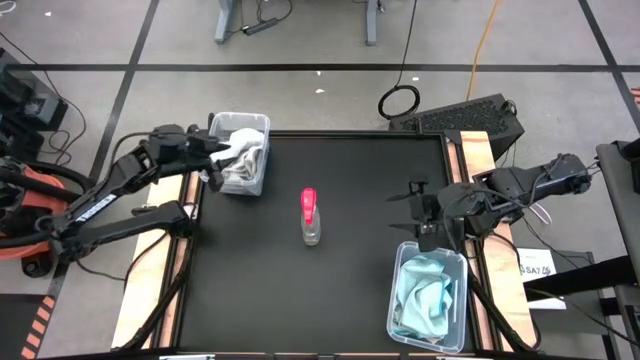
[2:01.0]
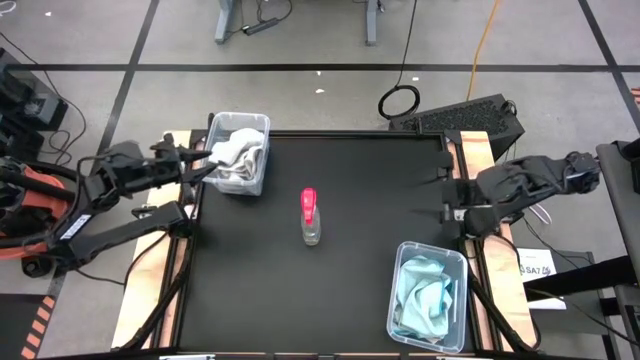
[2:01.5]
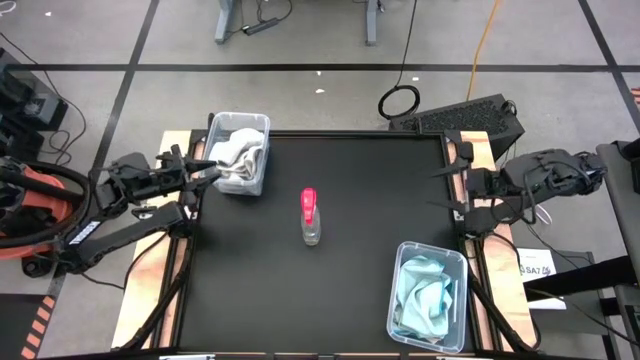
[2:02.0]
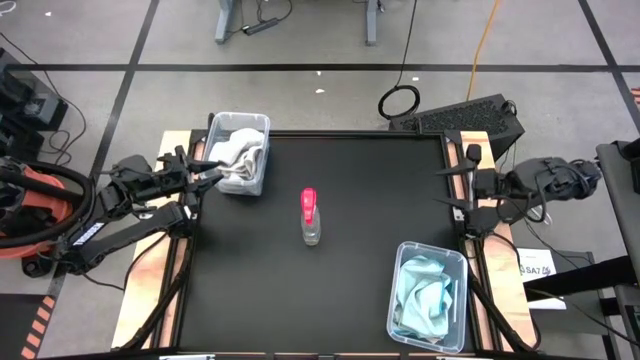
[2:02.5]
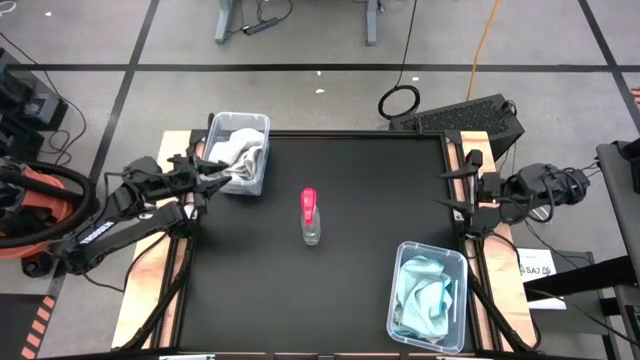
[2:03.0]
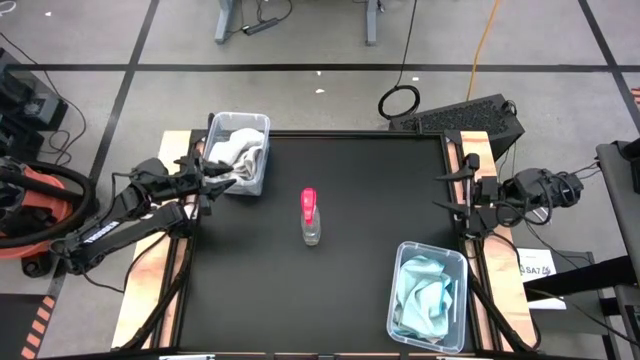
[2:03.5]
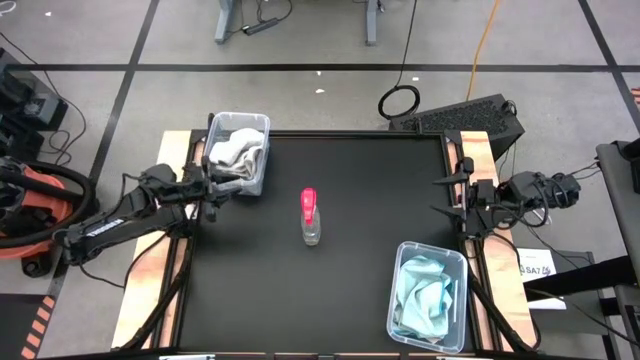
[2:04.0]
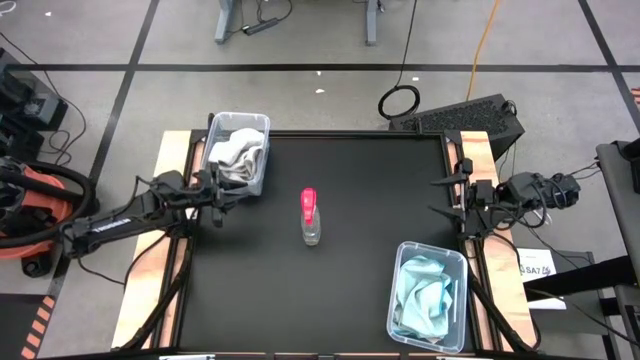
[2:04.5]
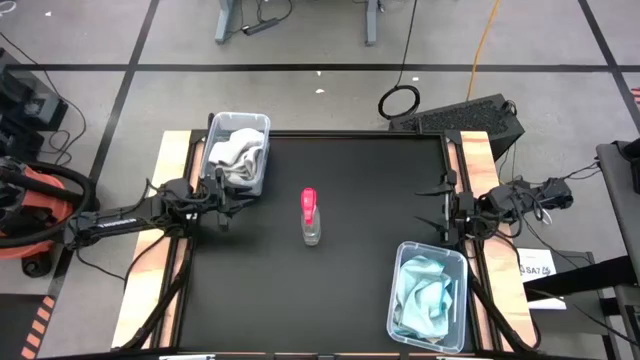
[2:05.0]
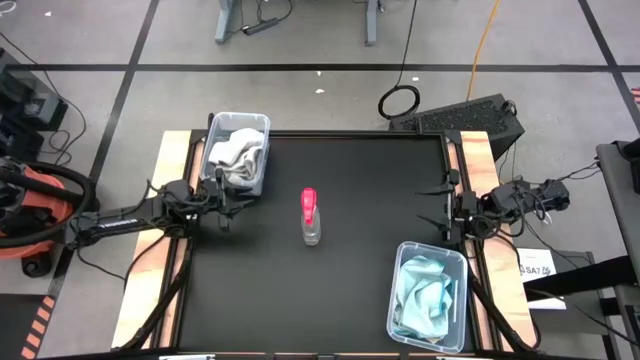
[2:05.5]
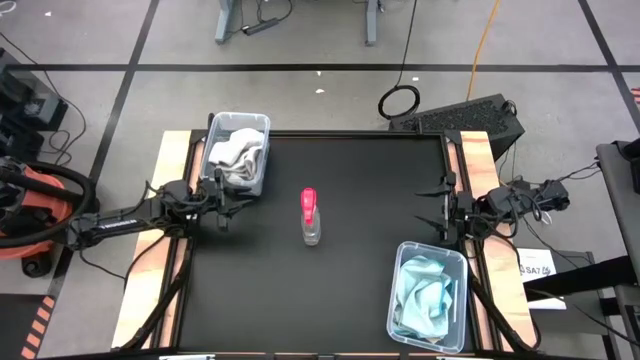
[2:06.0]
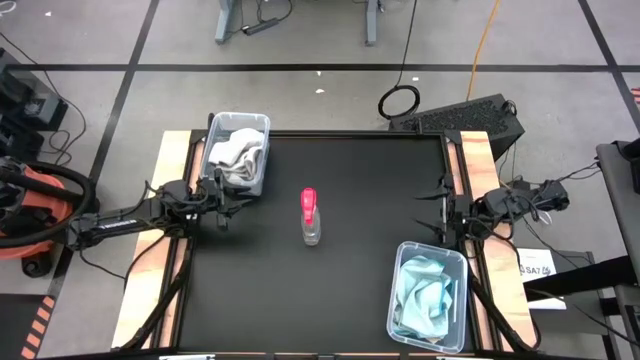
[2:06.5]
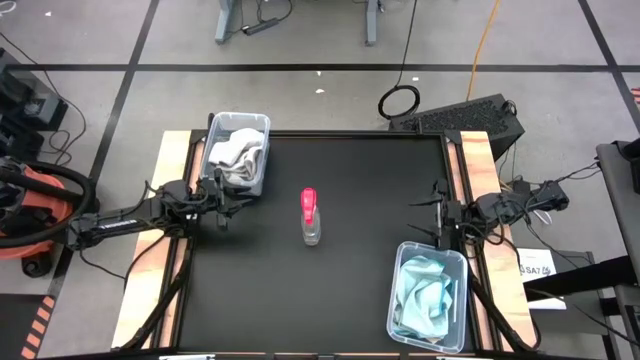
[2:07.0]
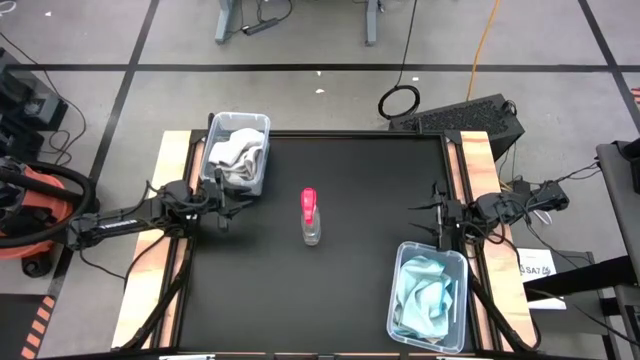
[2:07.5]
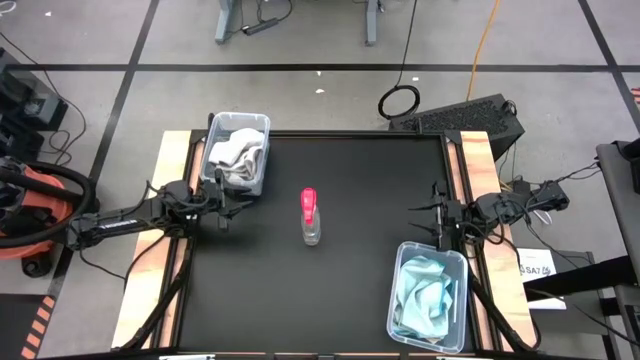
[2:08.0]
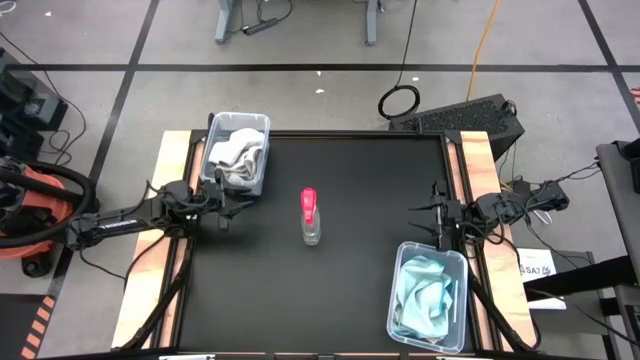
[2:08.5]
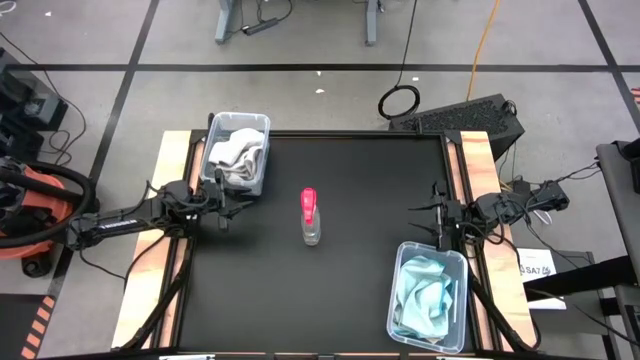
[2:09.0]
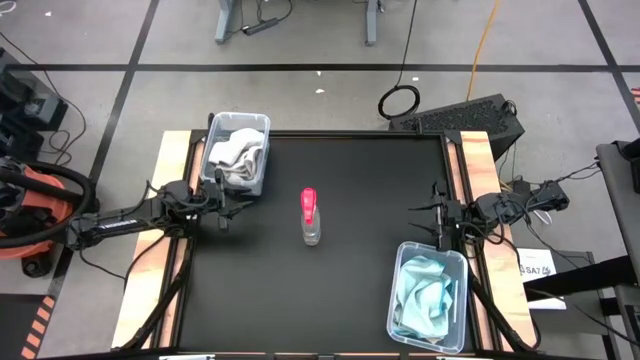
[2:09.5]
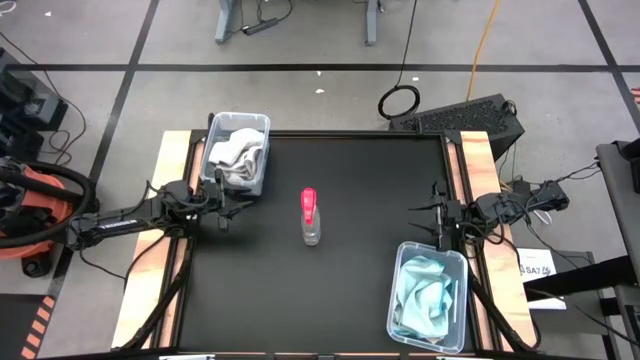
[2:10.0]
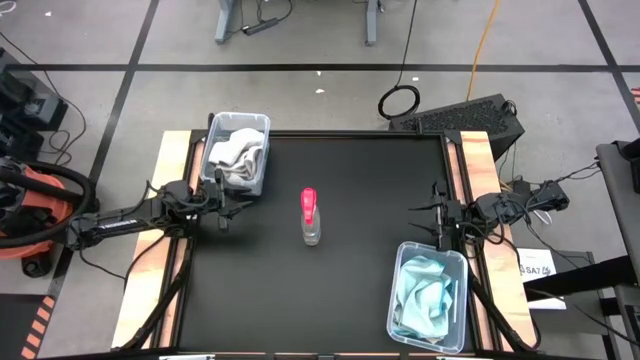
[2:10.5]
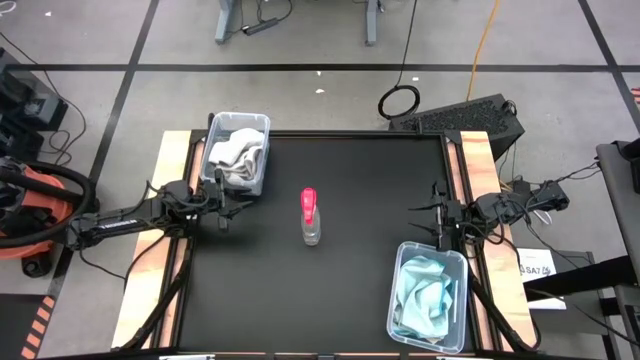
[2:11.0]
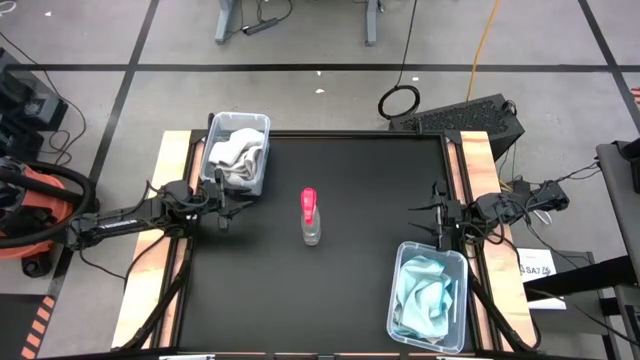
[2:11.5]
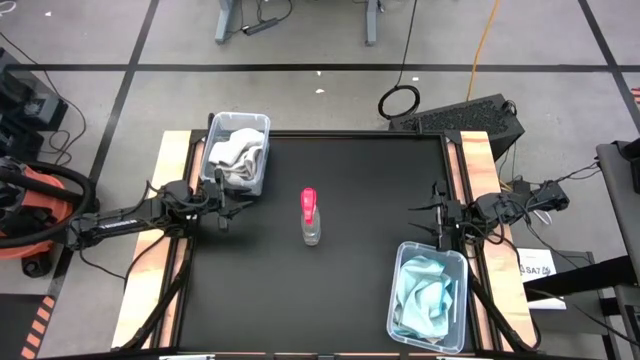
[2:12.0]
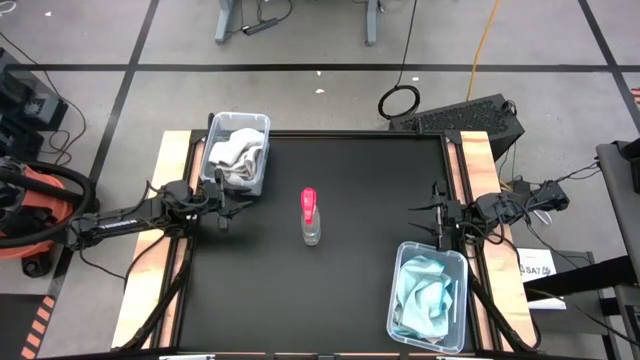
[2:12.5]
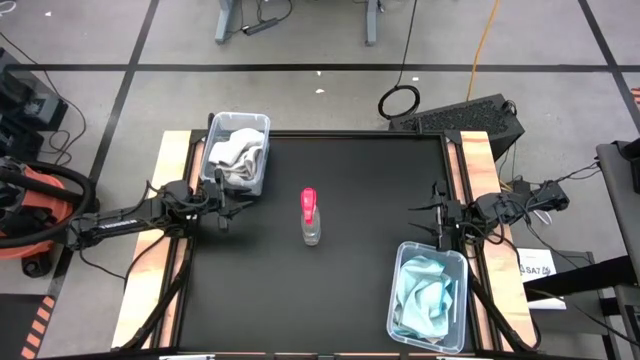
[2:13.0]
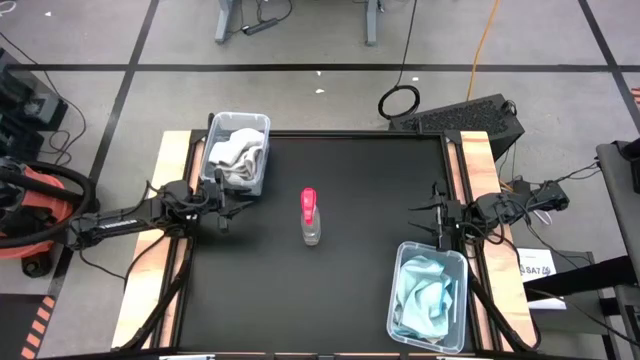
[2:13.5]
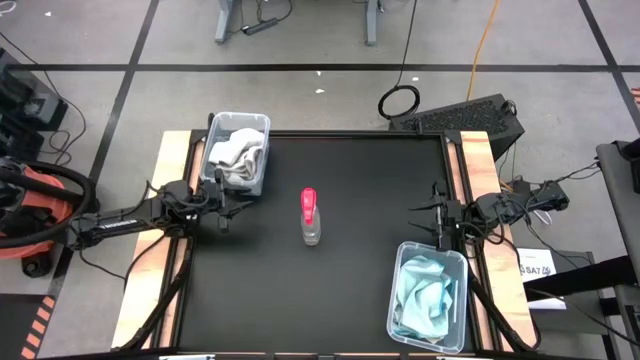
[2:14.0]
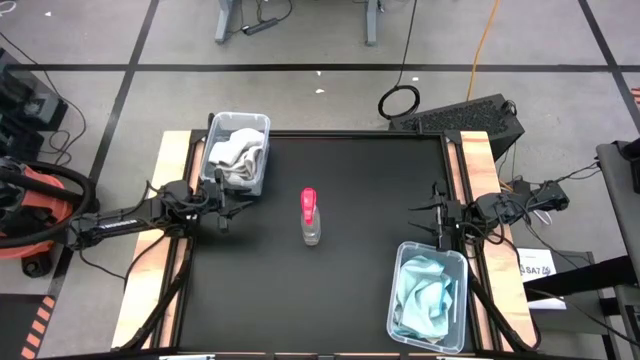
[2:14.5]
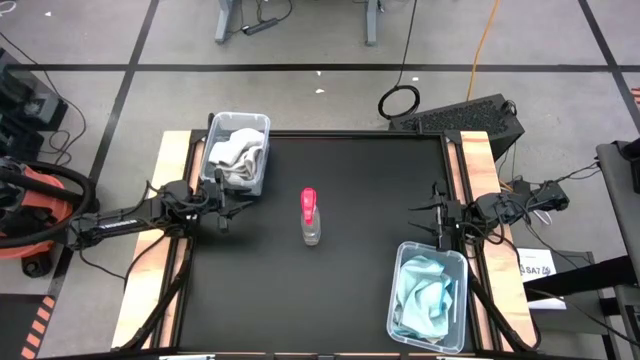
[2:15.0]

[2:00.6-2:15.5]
Task: Sort microfiber towel by color & place in baskets
Return to Home Position

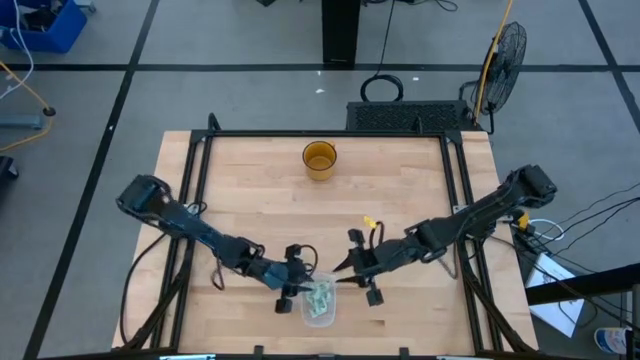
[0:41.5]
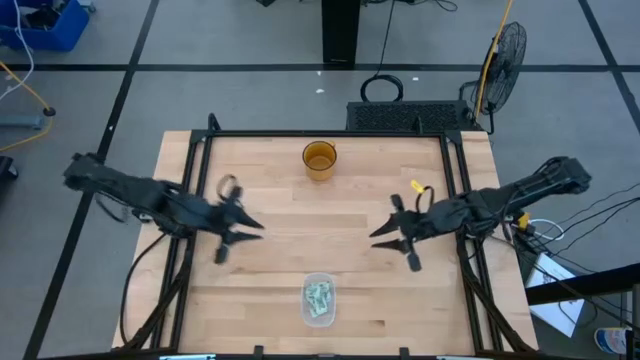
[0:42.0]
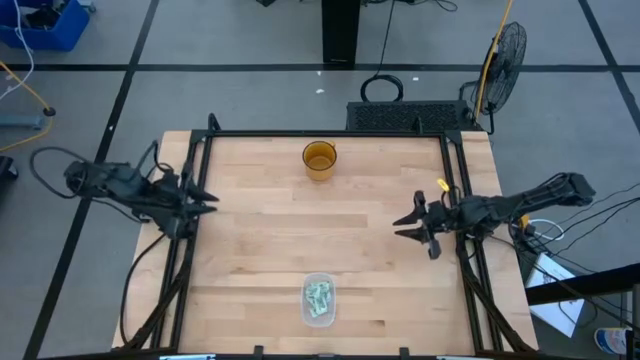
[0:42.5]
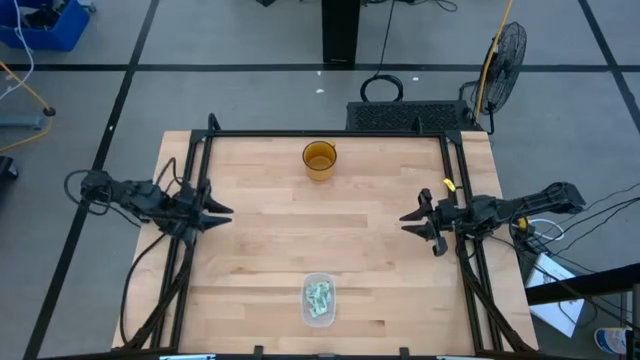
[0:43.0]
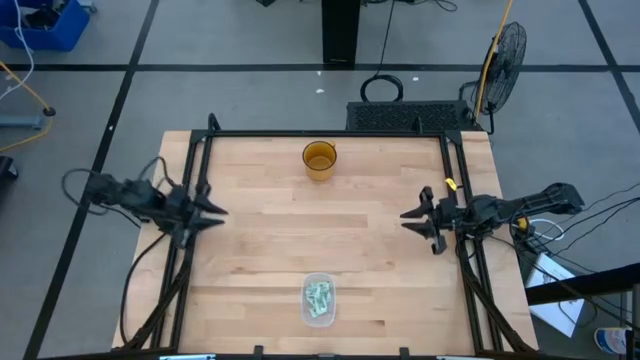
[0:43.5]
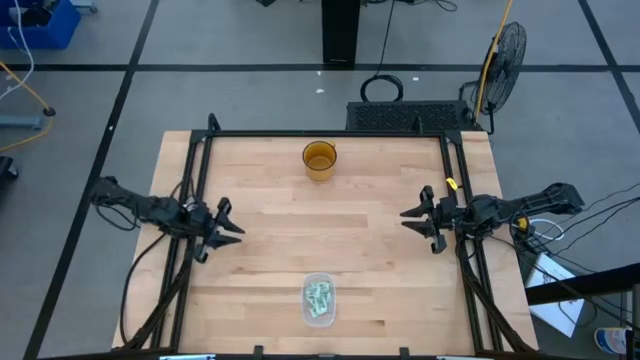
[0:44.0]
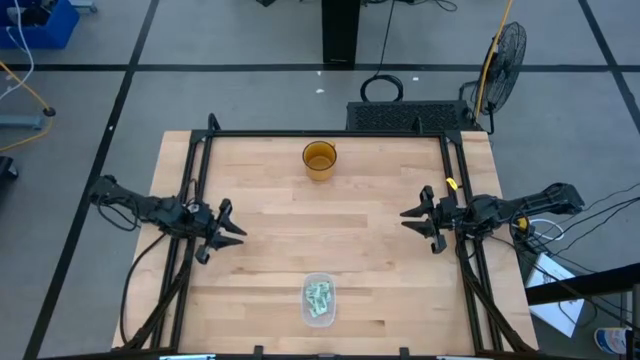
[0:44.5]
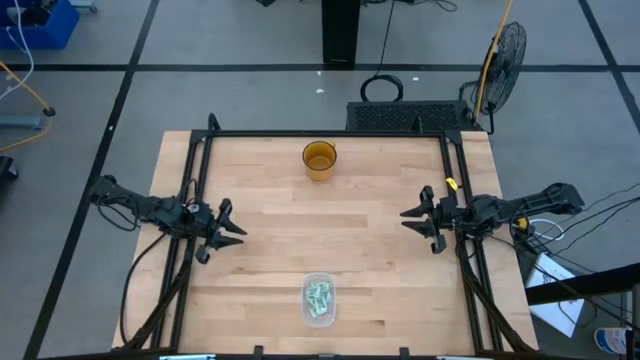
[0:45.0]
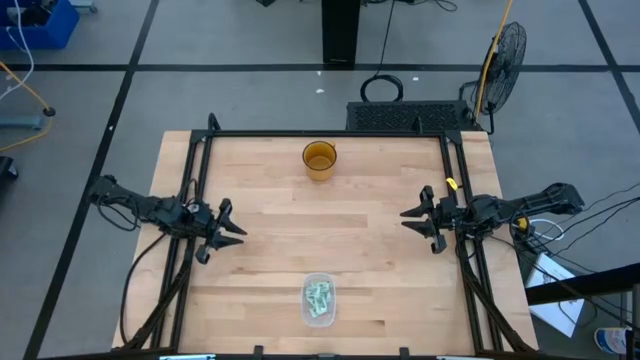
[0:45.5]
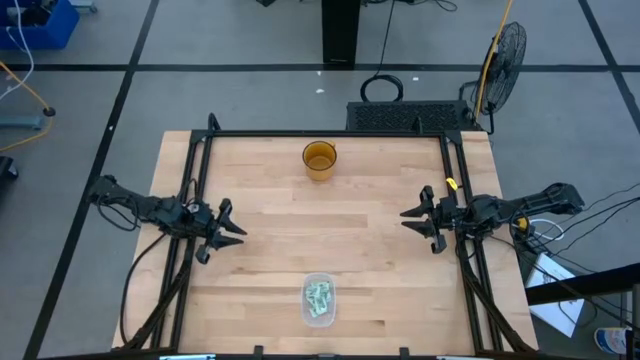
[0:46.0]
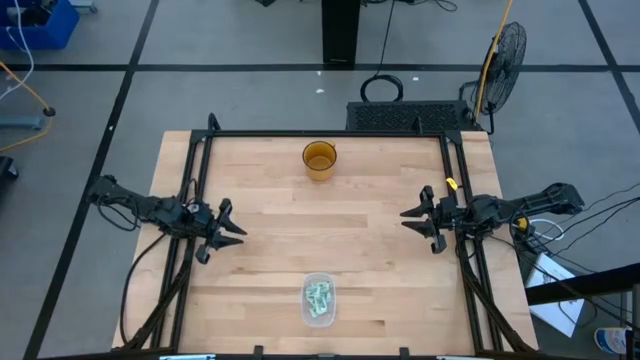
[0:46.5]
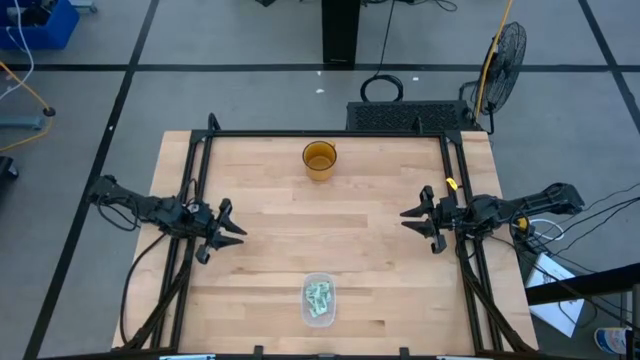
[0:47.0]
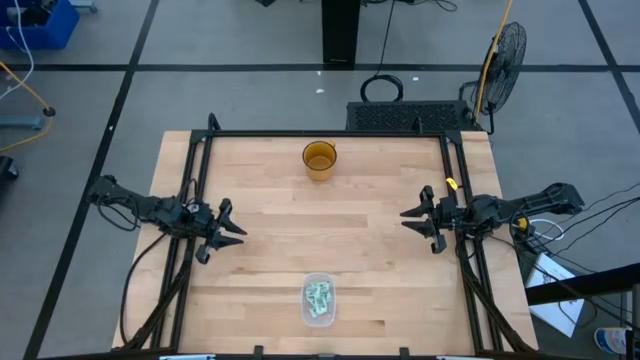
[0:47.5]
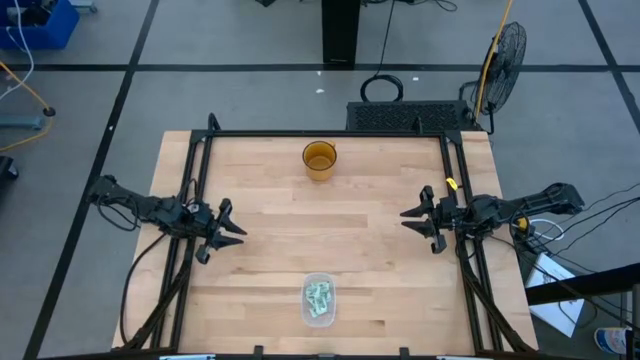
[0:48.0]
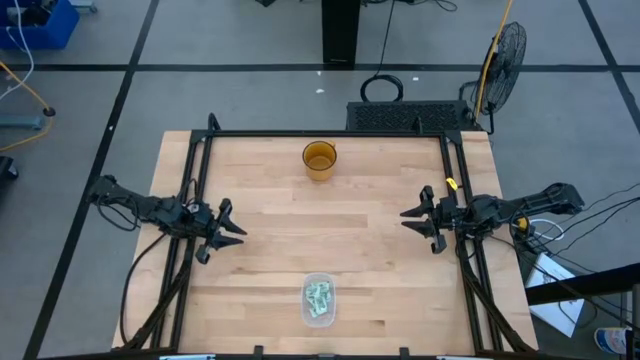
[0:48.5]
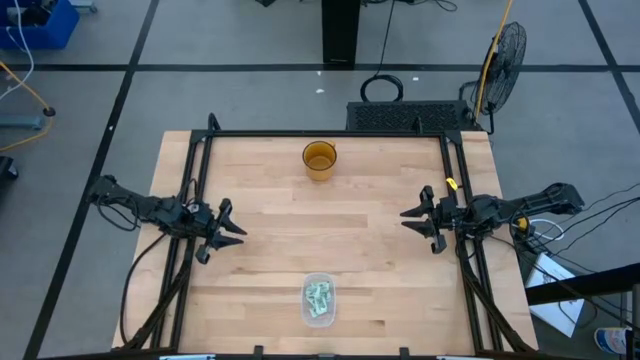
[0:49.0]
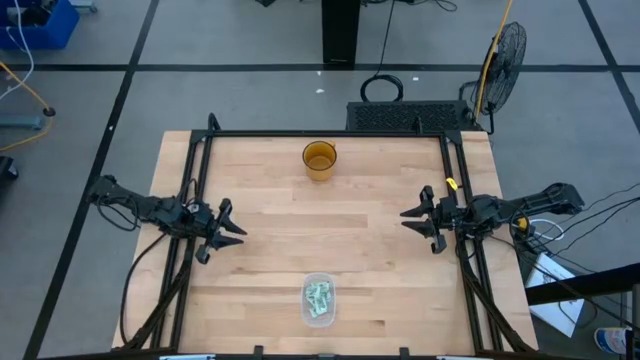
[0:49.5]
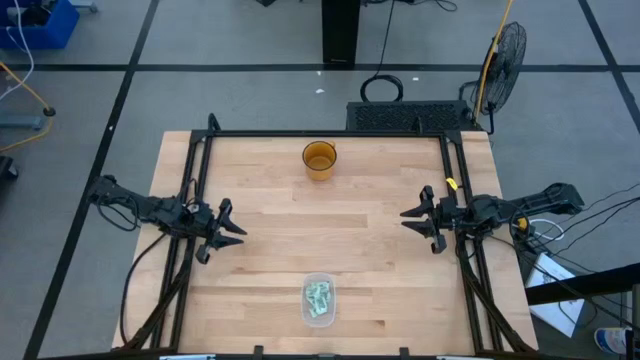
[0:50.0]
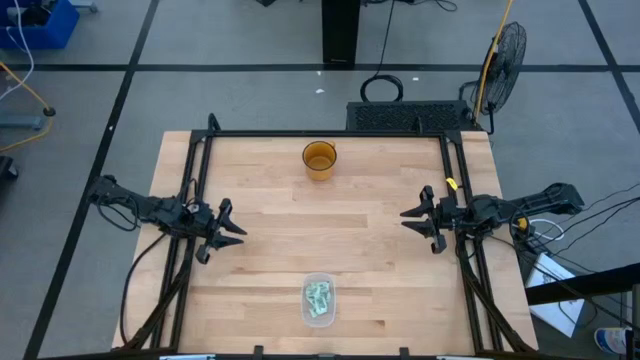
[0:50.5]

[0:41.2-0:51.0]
Task: Pick and place Stevia / Truvia into bins
Return to Home Position
